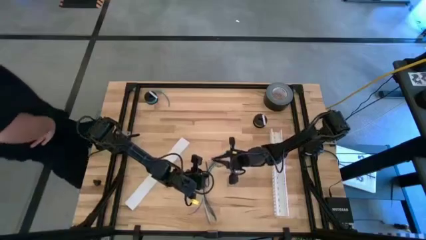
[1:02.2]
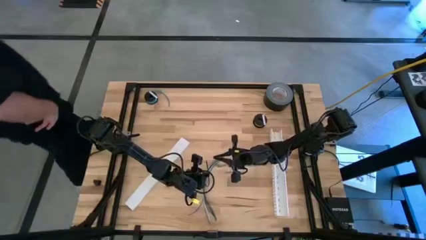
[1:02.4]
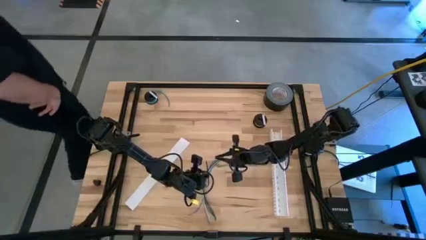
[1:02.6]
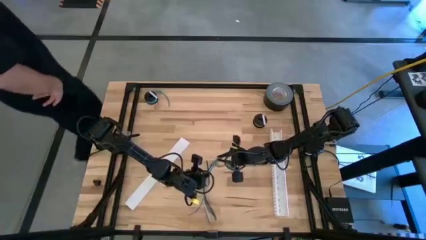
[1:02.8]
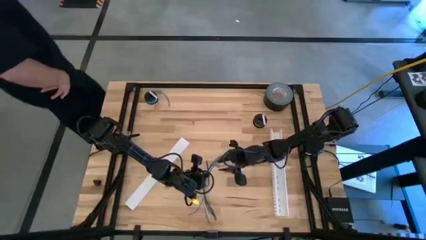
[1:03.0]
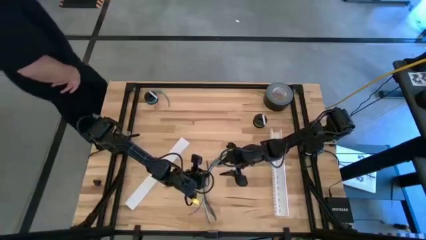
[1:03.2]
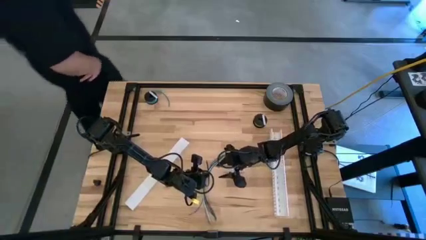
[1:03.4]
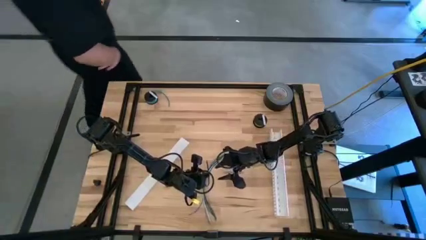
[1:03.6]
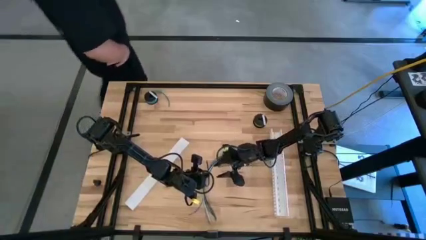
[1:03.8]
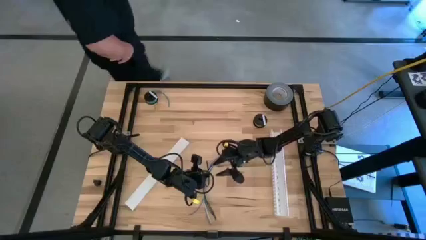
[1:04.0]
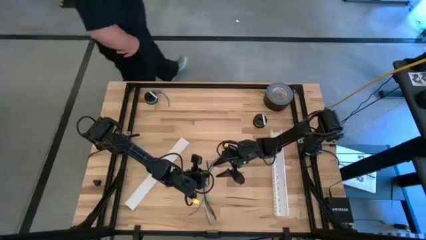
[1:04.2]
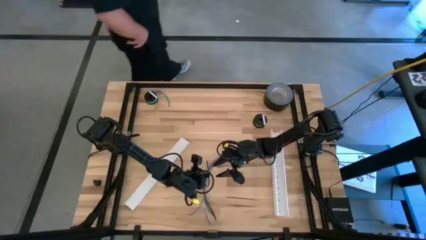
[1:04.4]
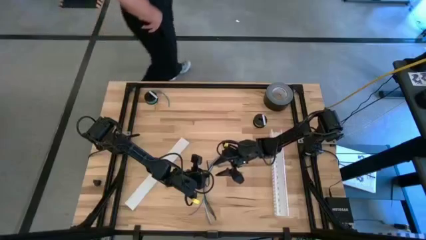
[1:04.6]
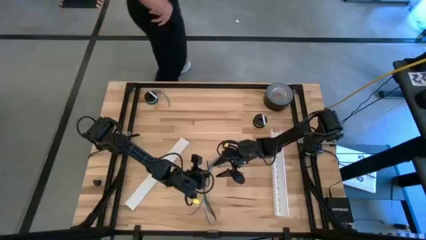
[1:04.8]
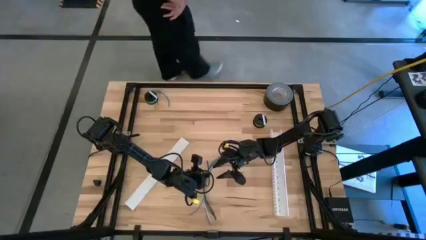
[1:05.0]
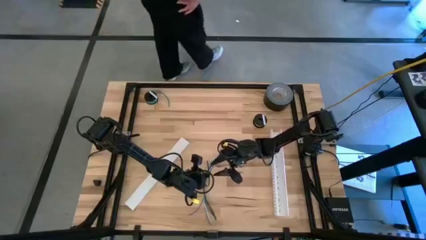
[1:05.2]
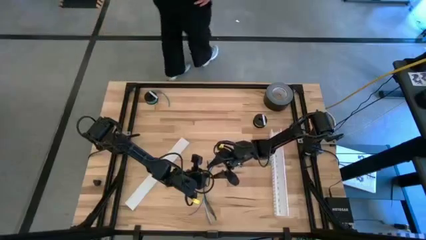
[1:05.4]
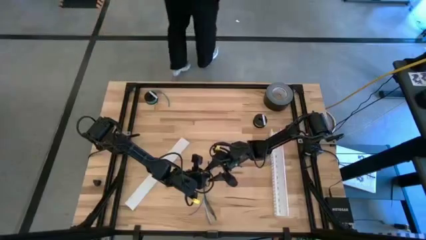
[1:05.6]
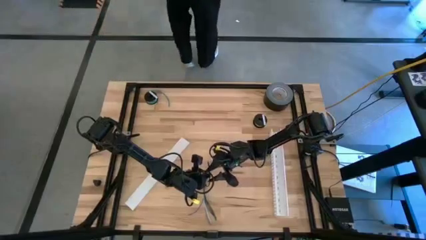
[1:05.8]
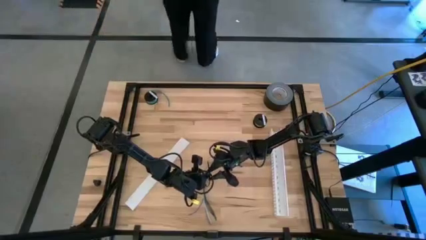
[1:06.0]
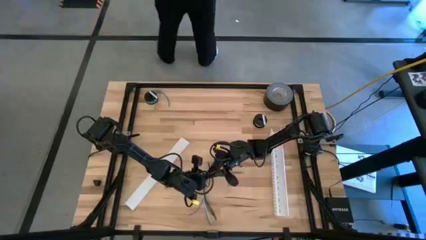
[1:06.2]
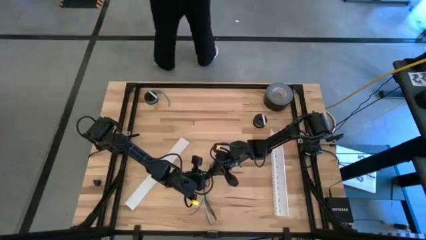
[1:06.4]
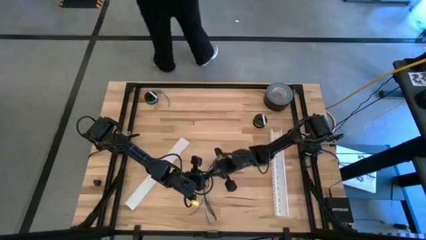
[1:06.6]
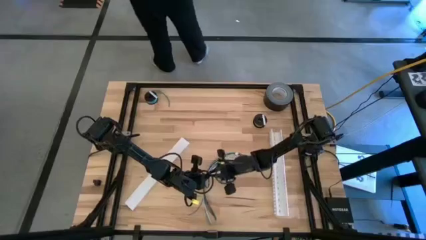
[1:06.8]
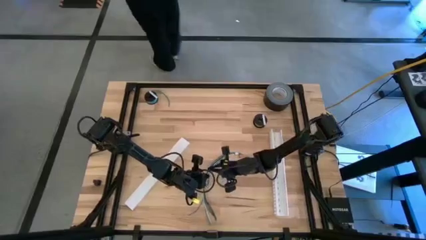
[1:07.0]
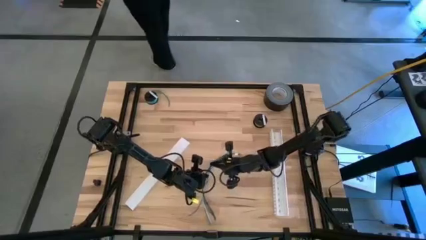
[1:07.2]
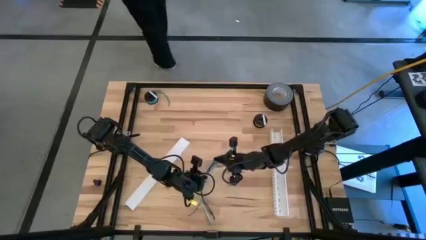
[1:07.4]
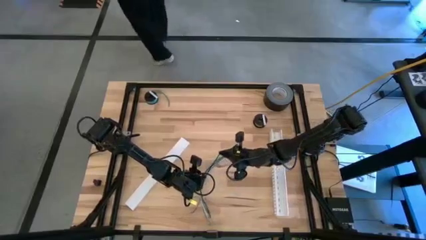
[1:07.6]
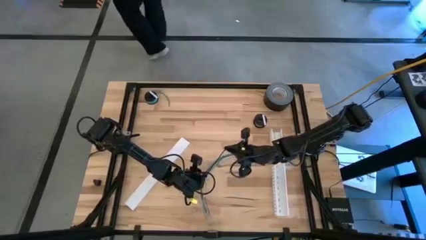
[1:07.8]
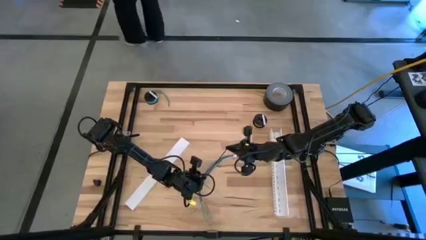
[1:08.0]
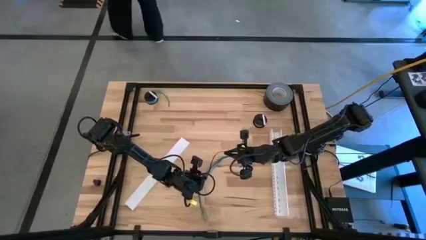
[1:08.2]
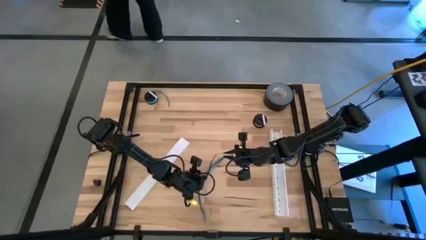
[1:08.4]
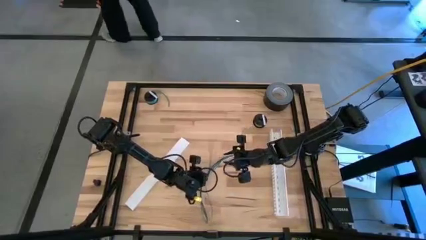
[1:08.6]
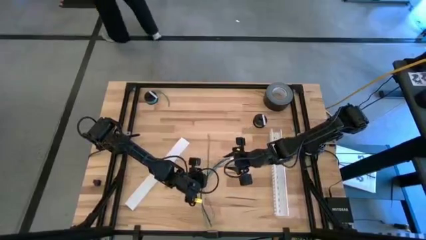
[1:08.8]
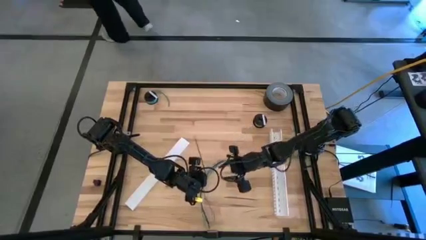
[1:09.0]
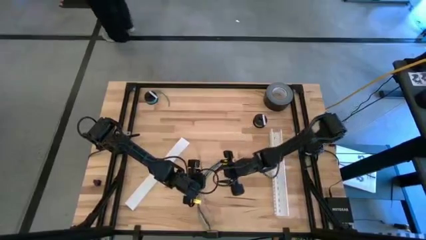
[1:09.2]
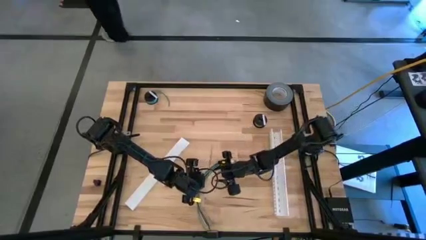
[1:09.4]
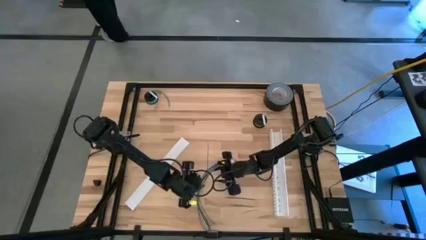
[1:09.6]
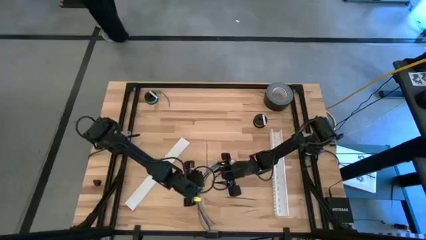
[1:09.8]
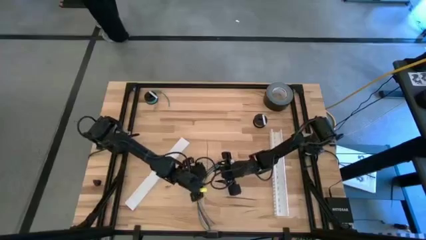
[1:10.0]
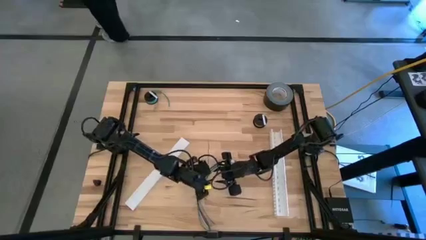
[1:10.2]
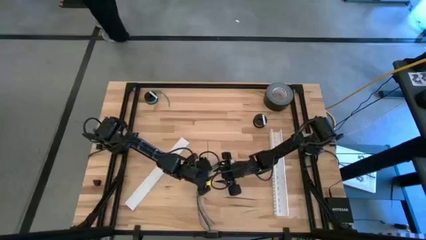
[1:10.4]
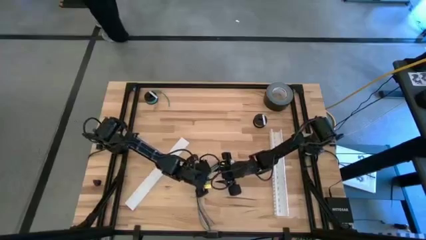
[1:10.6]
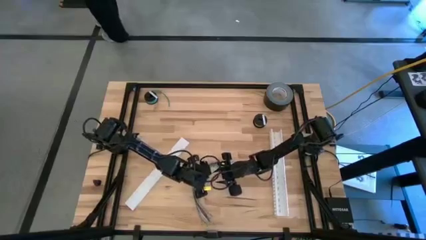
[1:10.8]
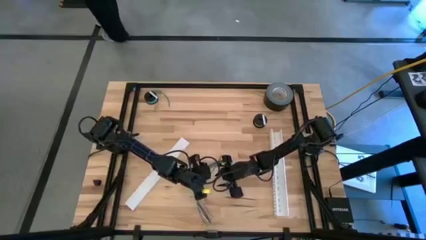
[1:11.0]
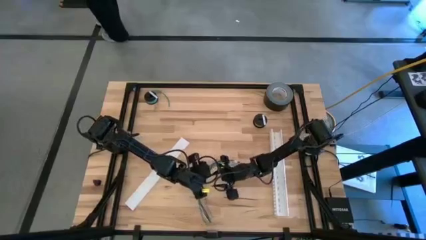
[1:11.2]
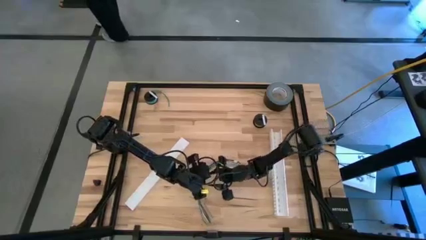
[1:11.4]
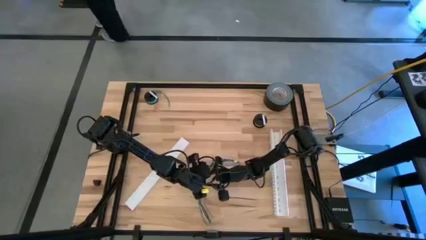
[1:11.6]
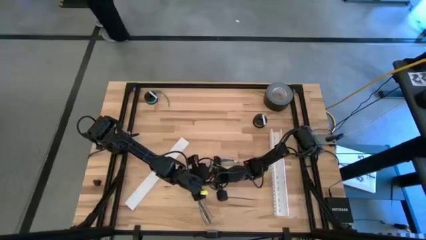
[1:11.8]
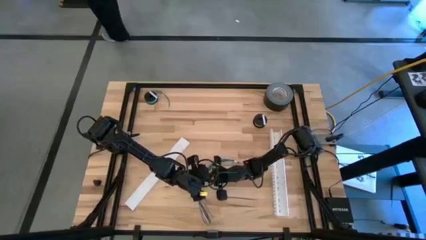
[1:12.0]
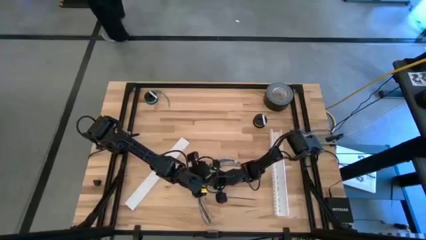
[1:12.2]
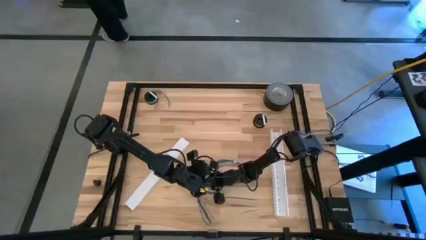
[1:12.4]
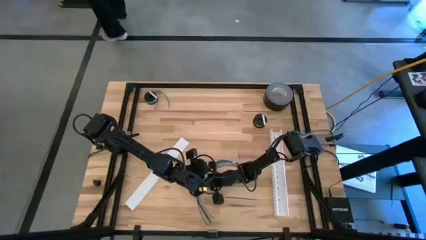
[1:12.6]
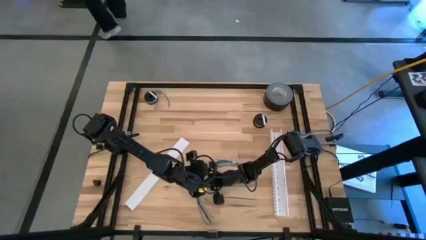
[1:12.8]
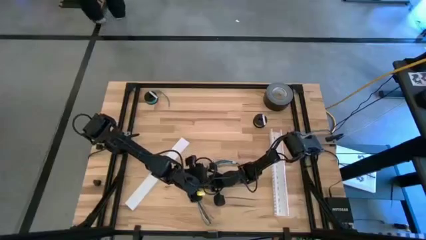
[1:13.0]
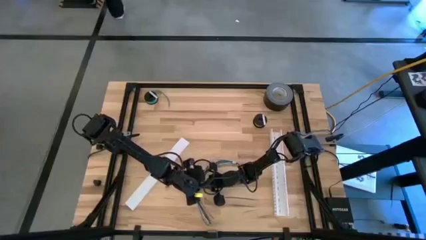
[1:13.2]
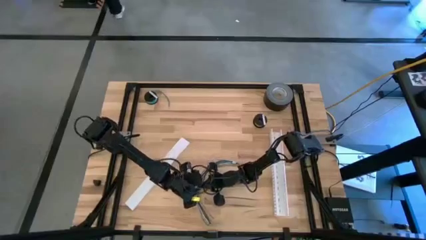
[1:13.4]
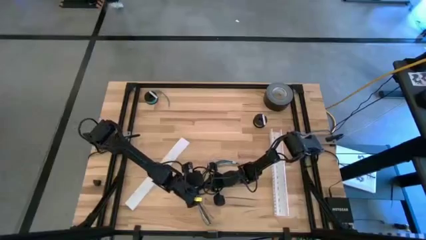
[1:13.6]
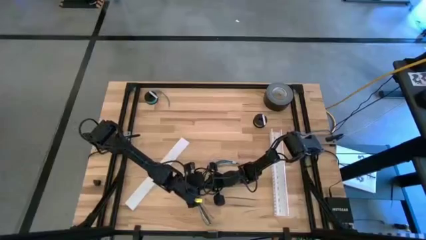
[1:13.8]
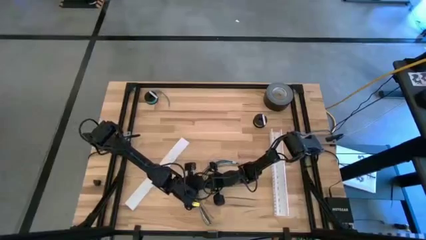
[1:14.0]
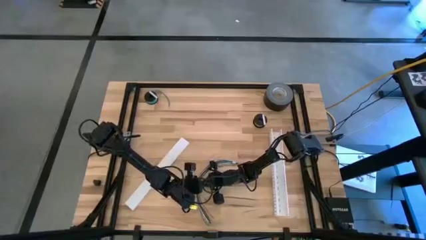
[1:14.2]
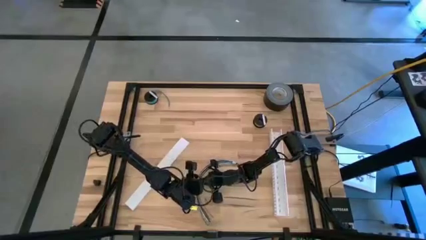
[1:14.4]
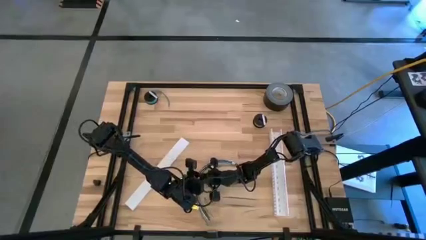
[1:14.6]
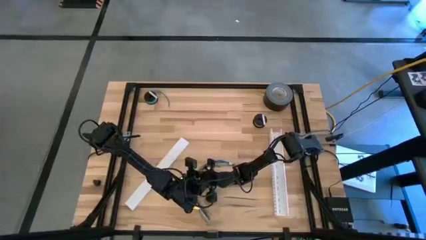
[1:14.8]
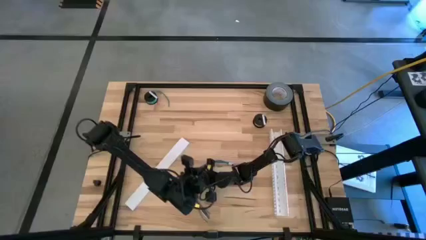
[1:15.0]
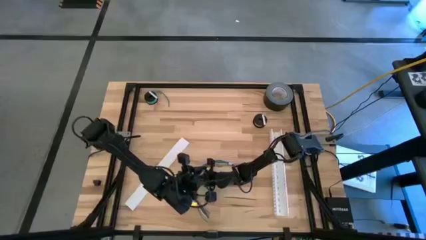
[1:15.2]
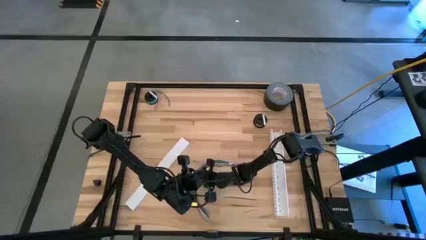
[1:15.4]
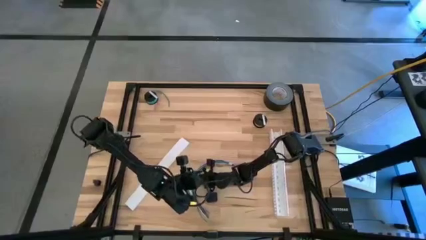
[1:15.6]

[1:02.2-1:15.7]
Task: Ziptie cables
Wrap the cable wires using the black zip tie

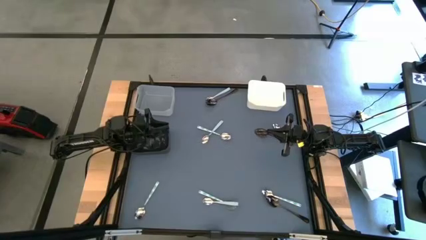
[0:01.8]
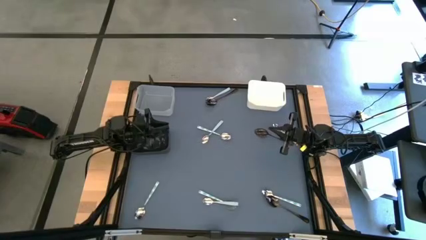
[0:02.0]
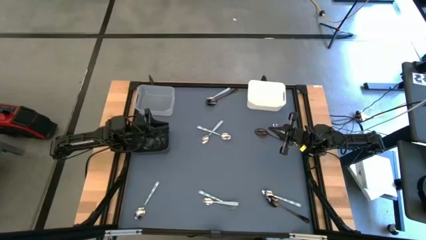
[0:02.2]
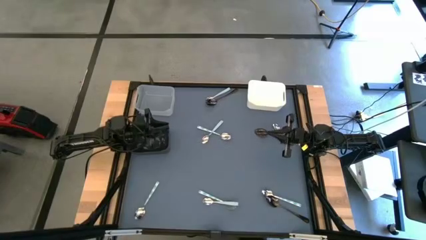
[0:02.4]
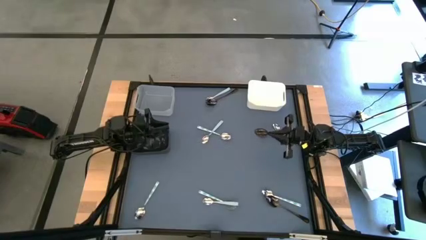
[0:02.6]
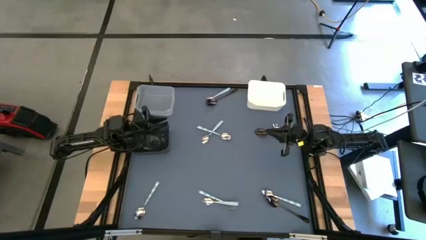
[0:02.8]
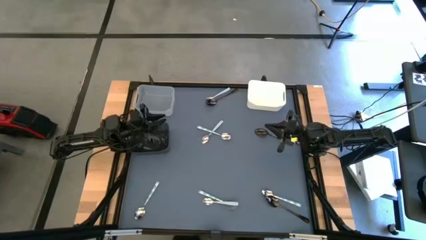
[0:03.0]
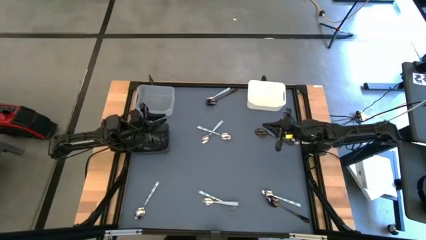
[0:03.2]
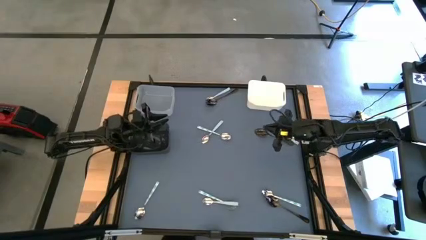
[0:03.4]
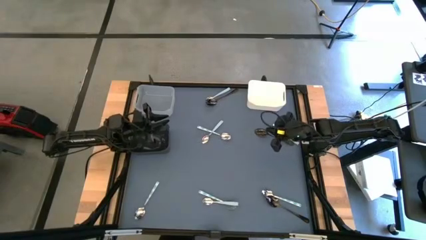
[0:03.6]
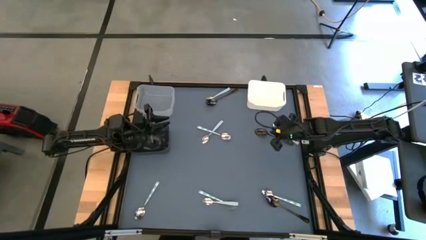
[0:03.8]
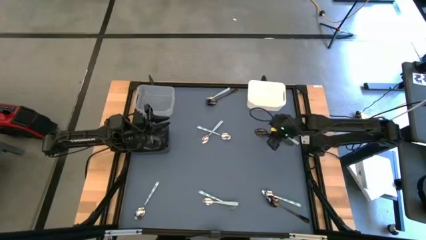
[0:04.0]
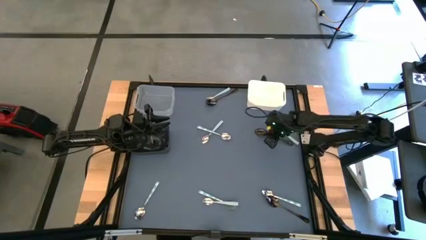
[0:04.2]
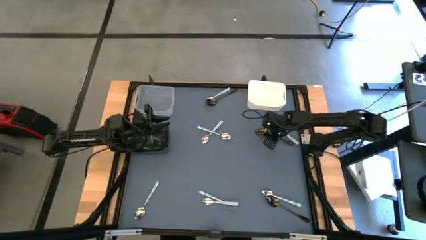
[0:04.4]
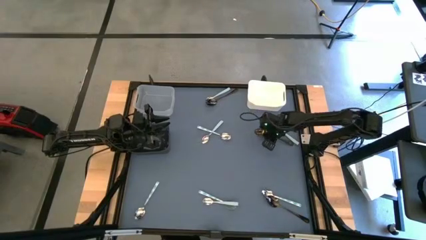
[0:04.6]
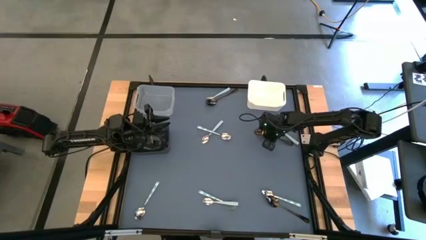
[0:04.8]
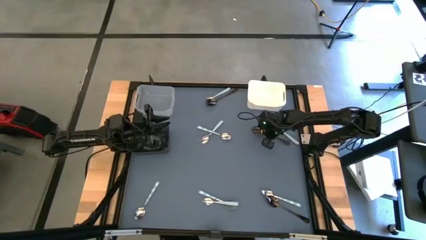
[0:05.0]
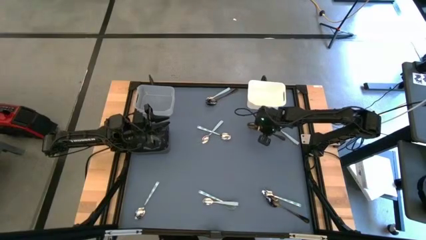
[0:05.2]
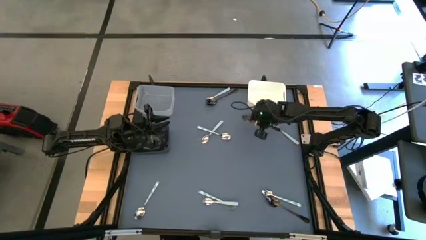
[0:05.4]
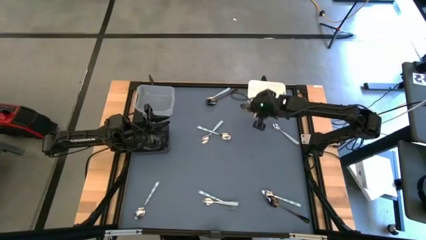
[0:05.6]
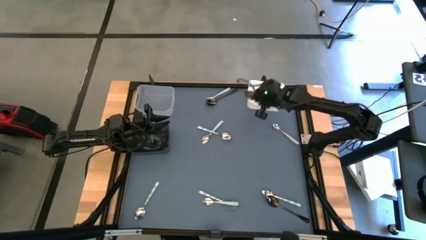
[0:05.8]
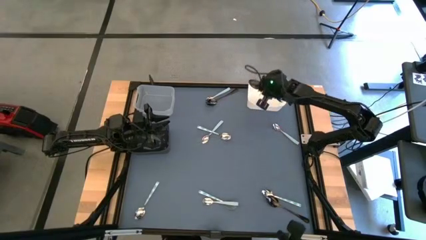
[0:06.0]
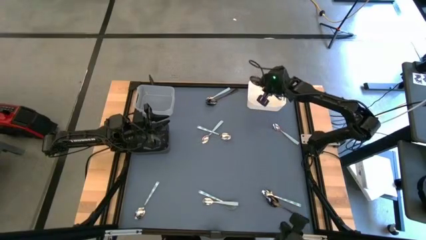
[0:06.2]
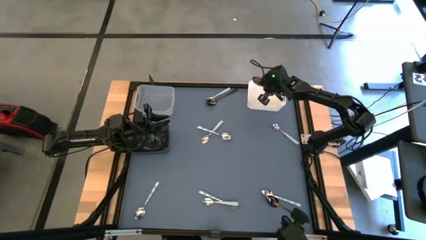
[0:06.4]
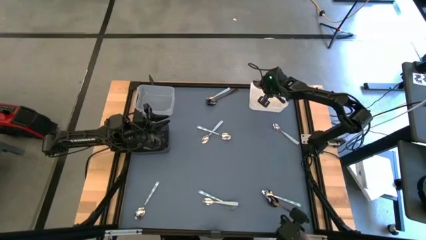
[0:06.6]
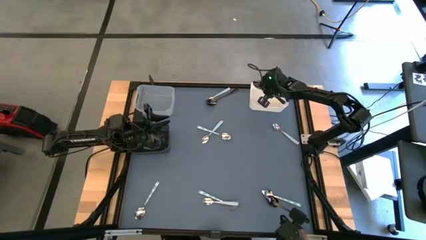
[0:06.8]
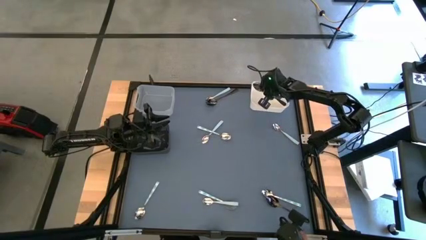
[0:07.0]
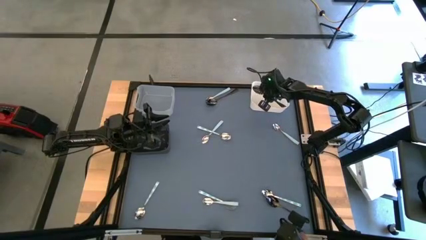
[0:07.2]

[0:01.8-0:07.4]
Task: Sort silverware by color (type)
Put the black spoon into the white bin
